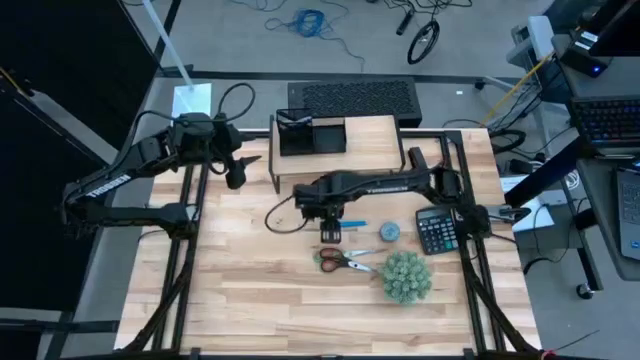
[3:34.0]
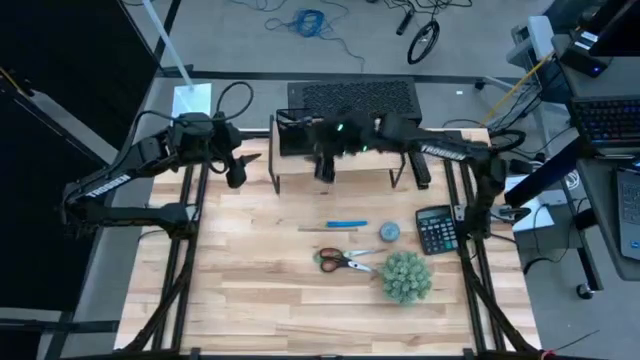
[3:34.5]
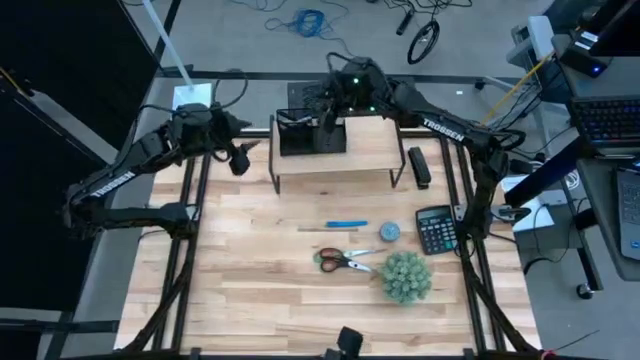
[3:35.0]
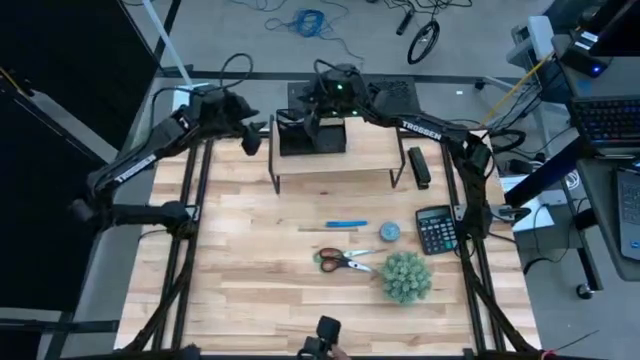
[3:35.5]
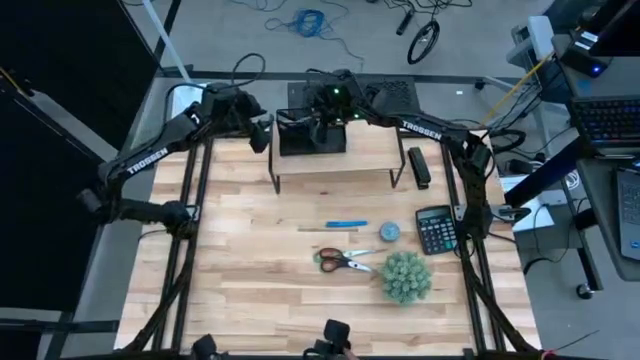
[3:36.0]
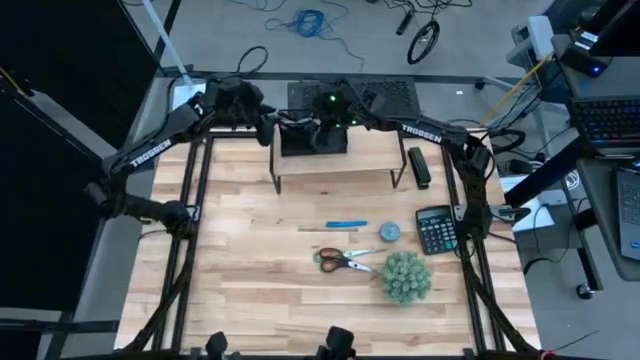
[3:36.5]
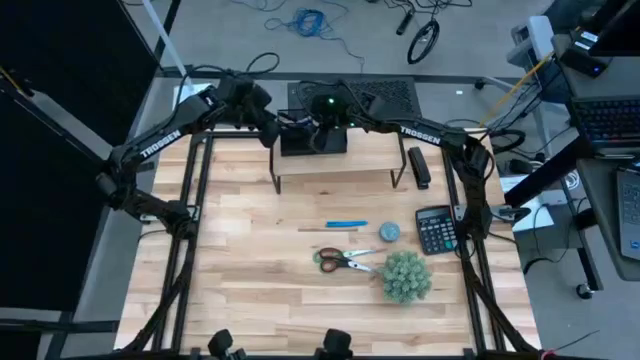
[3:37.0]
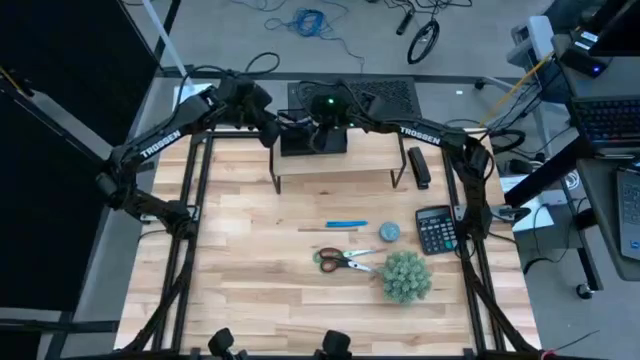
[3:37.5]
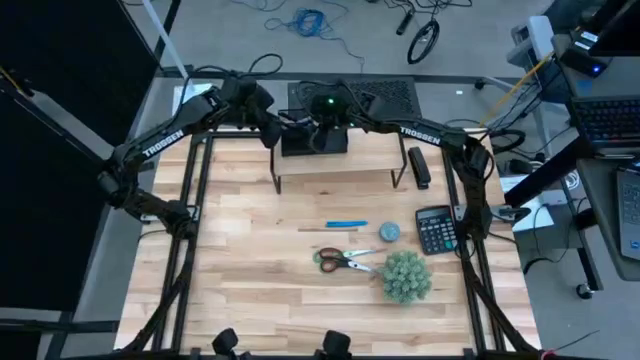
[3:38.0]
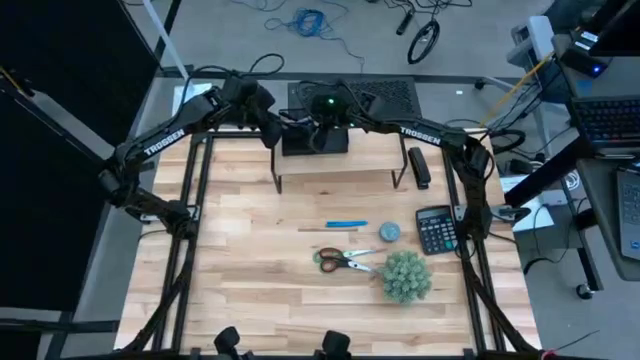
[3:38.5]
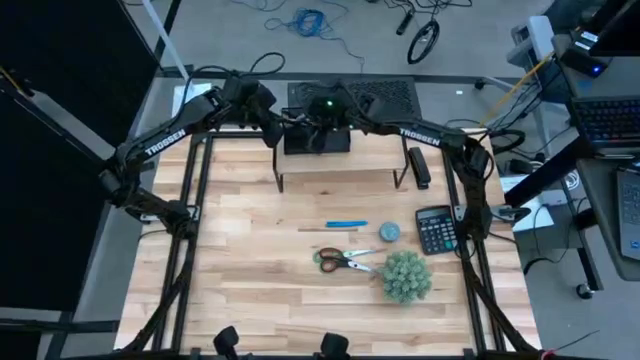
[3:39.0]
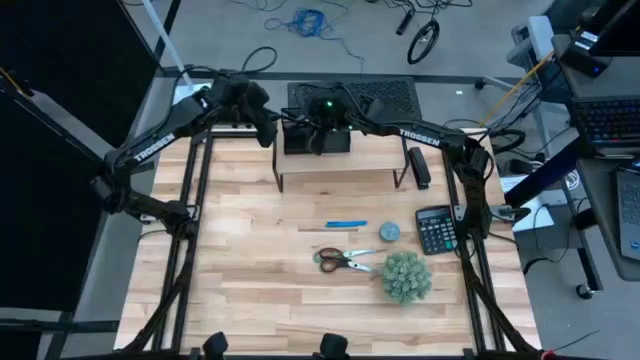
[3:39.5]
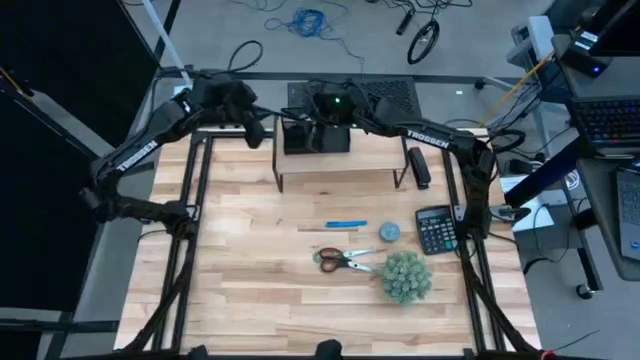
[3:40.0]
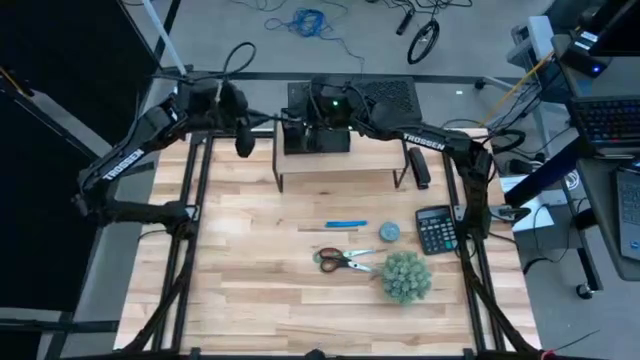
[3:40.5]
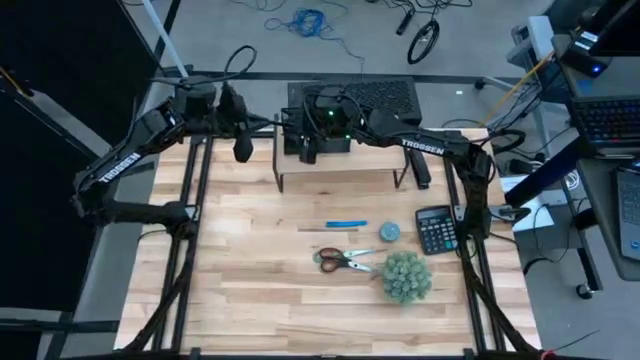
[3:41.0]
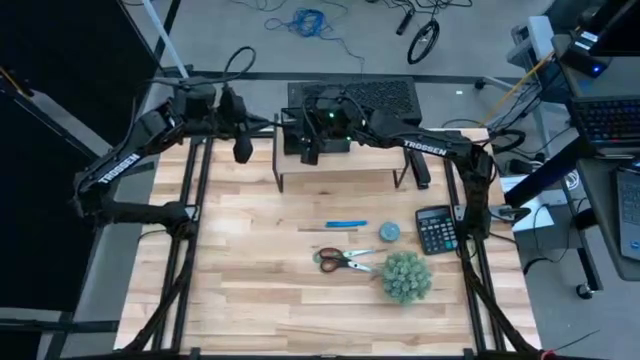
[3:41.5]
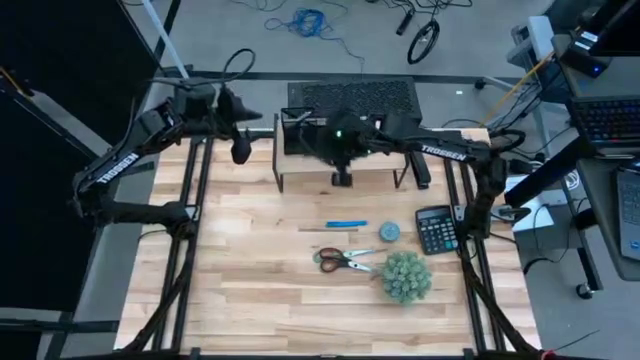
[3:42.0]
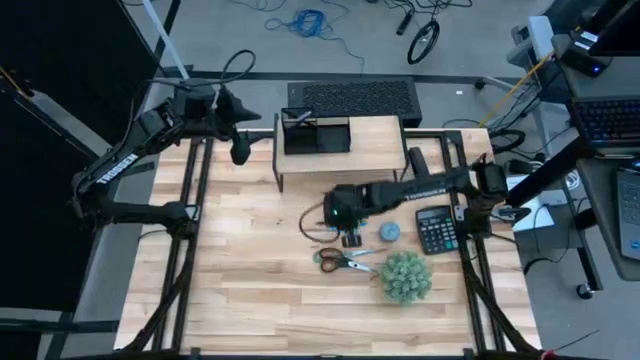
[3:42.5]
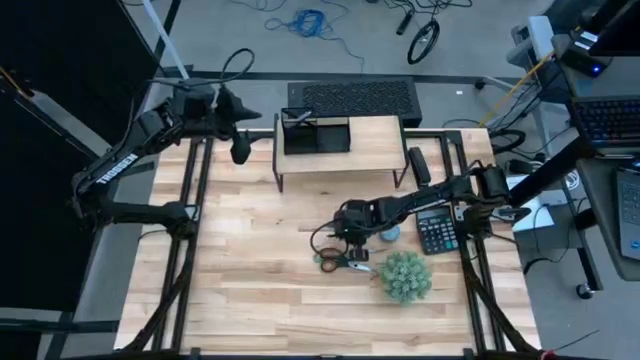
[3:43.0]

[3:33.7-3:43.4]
Task: Pick and place office supplies into organizer
Remove the black pen from the desk organizer on the shelf

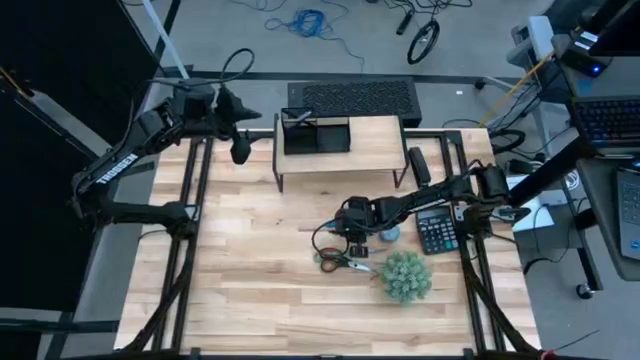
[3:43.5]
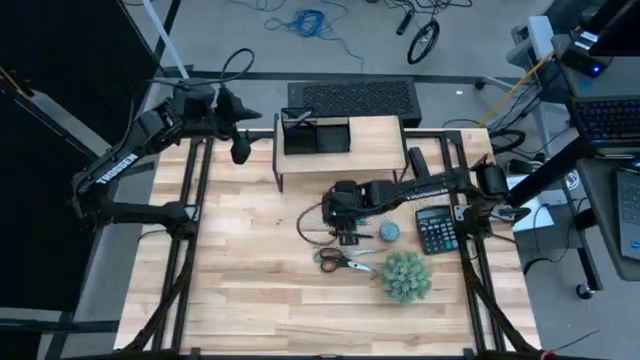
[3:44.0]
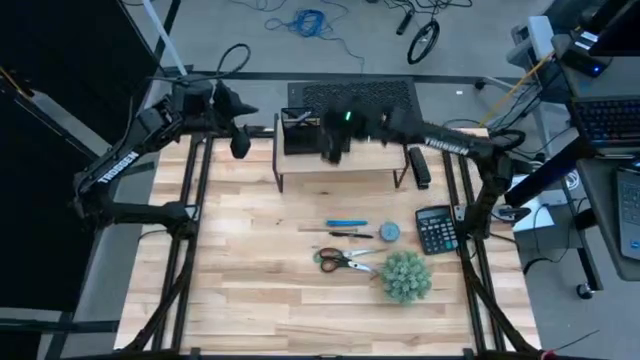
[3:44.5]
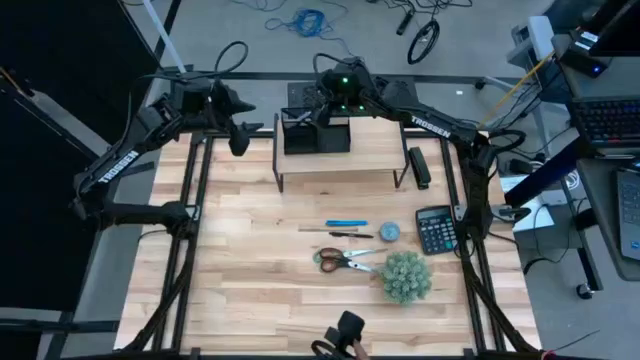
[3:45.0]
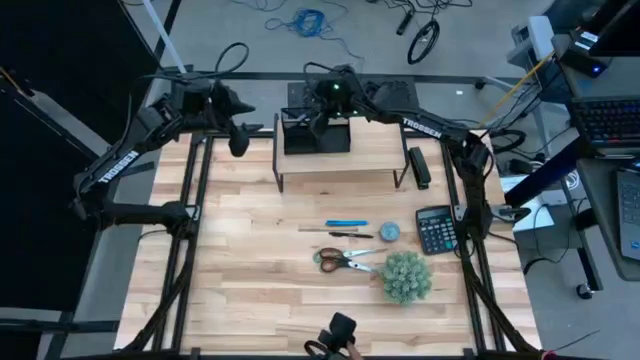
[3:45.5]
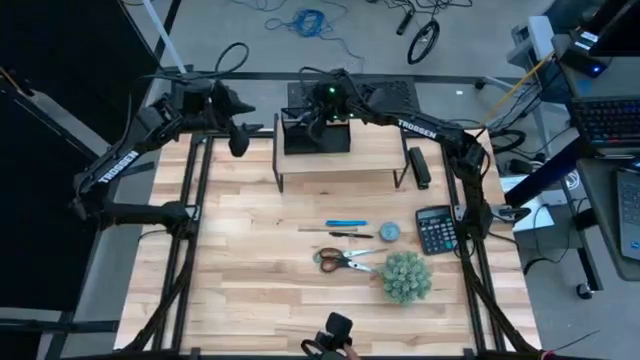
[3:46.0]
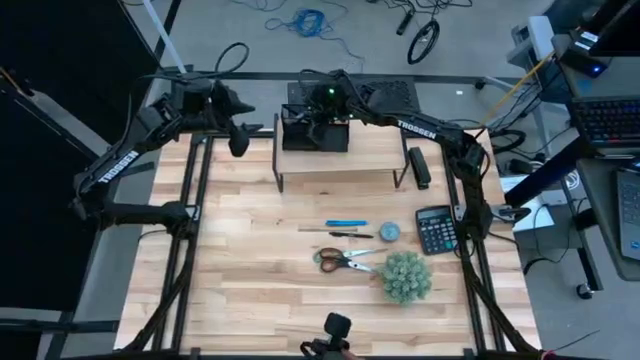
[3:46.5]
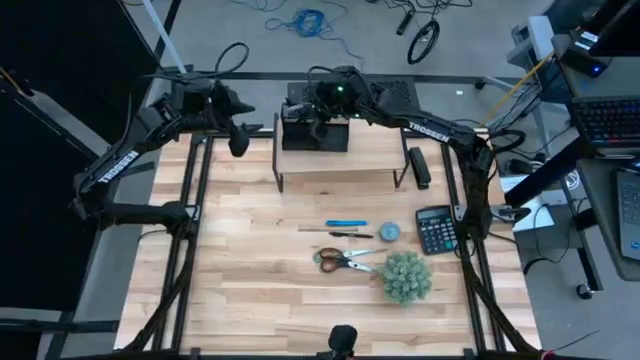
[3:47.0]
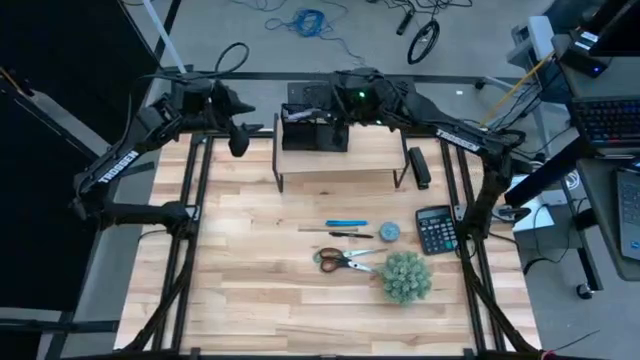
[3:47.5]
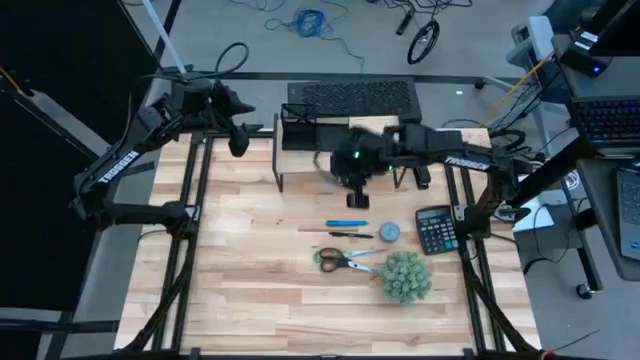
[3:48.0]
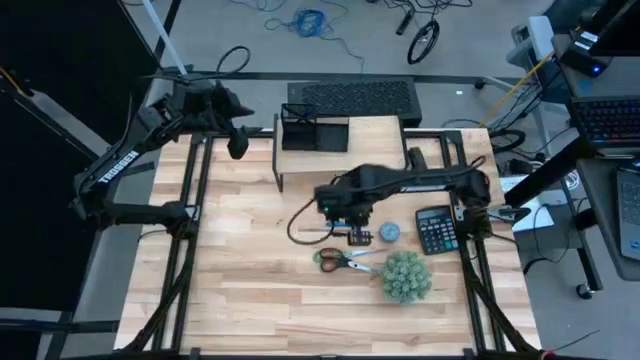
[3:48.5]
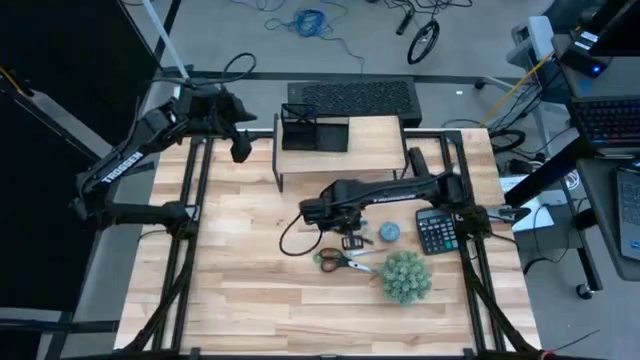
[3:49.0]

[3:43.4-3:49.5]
Remove the purple pen from the desk organizer on the shelf

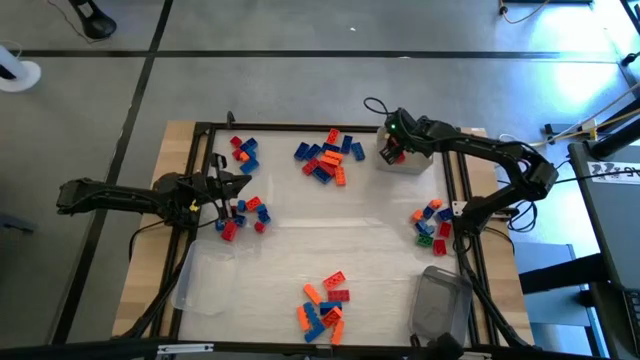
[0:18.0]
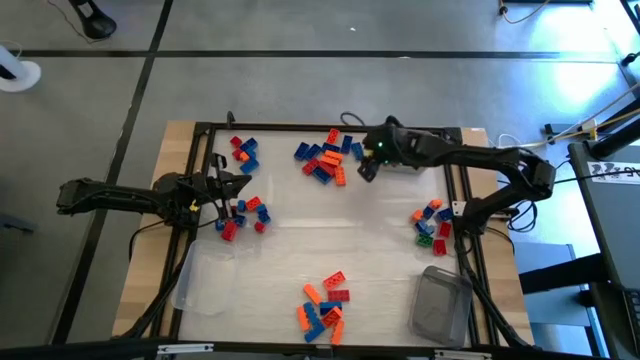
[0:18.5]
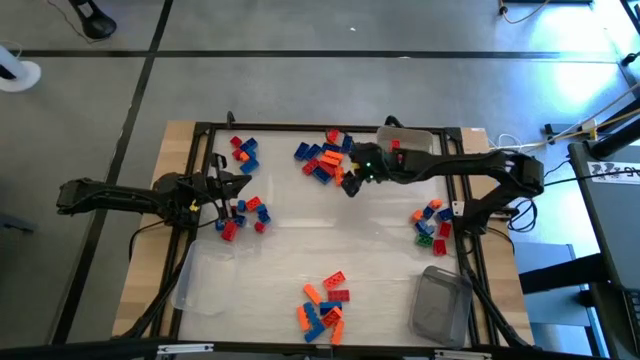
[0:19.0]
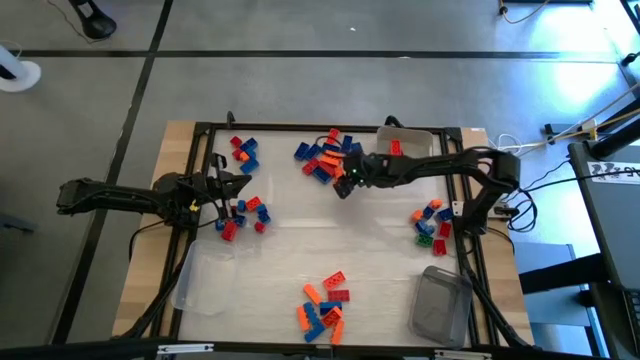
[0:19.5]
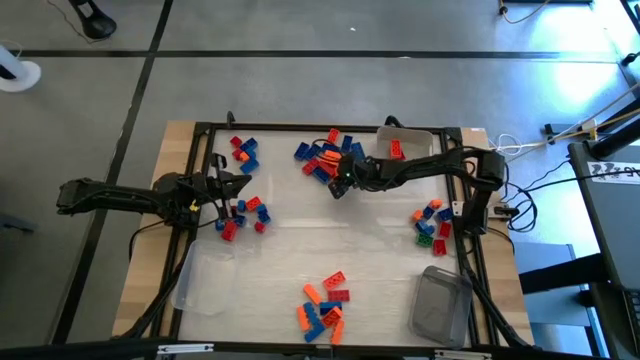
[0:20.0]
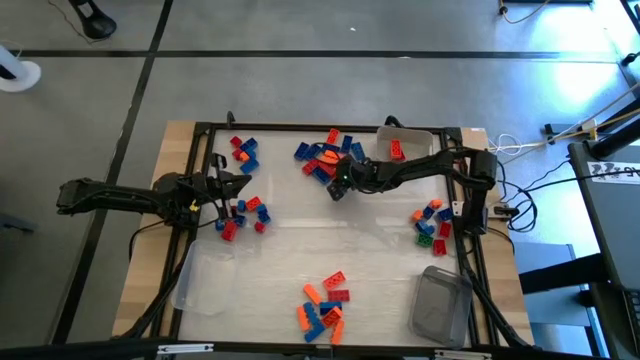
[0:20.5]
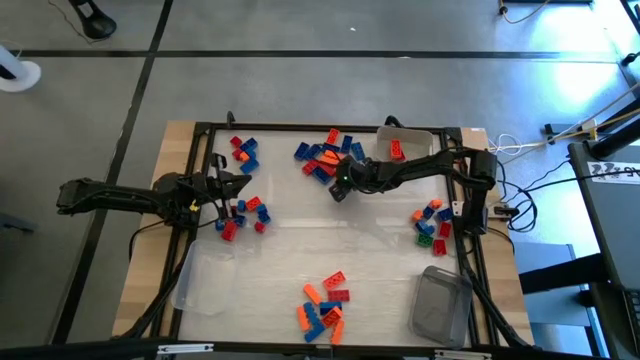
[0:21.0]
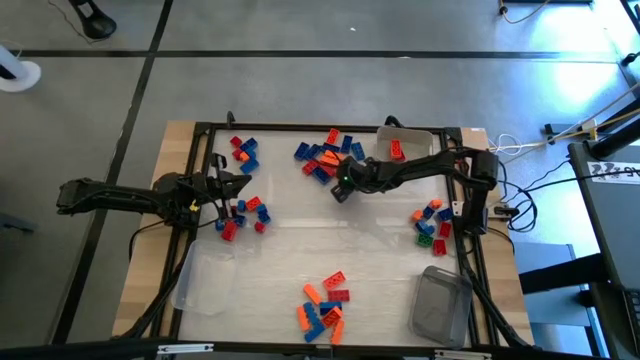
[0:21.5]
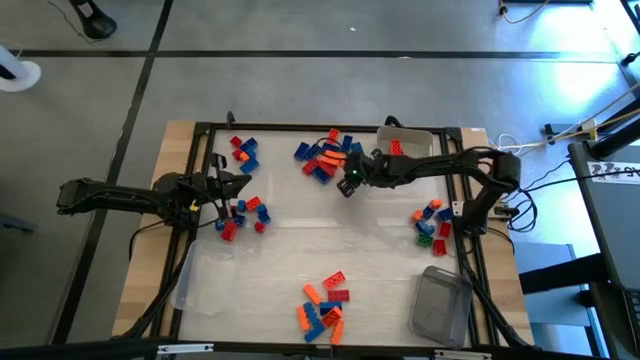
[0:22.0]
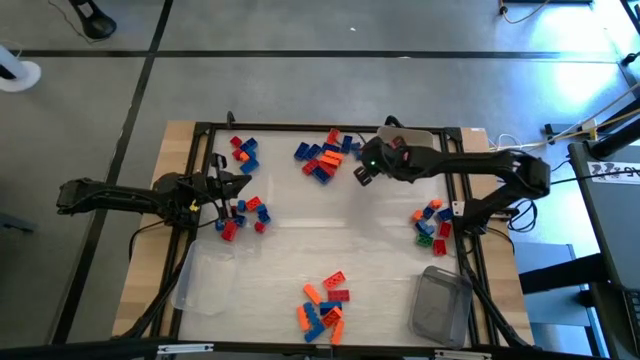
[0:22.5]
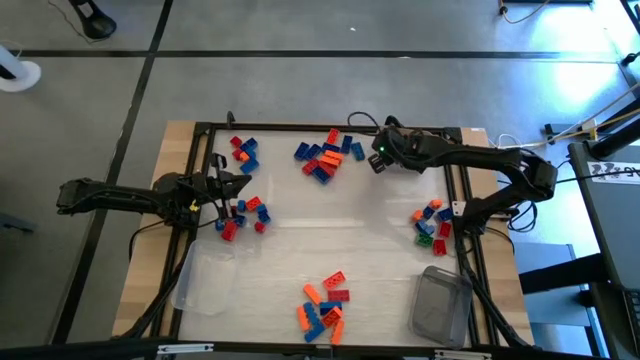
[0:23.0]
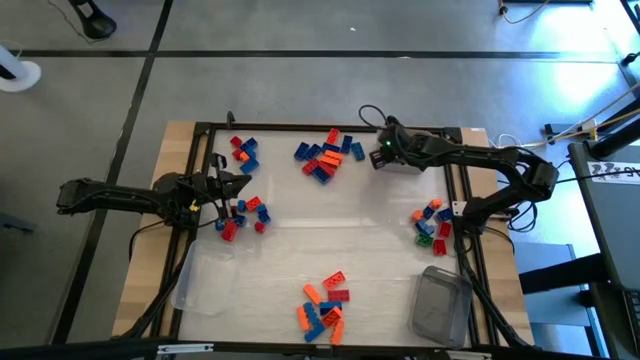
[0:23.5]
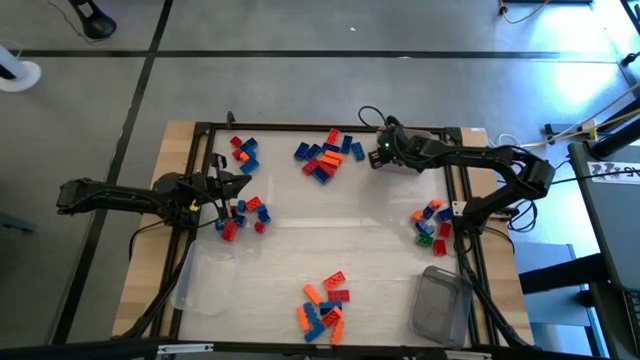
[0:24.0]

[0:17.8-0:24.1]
Task: Sort blocks by size
Put the orange game piece into the gray bin
